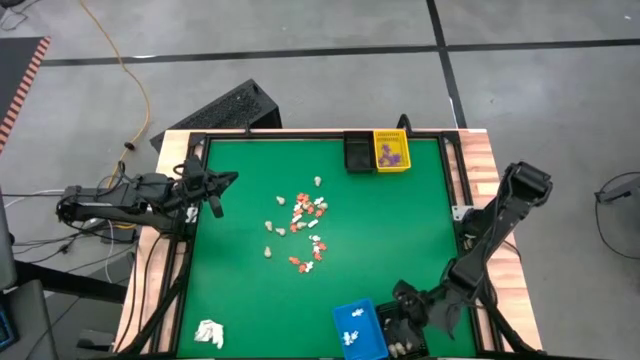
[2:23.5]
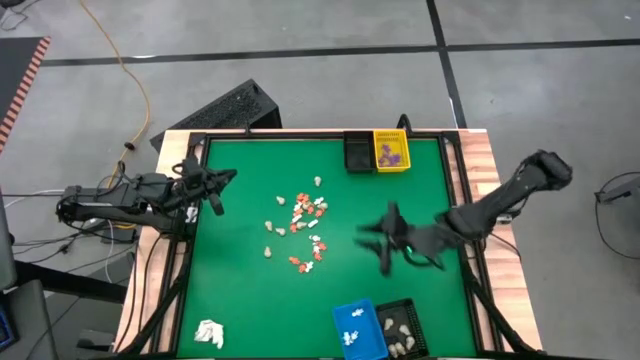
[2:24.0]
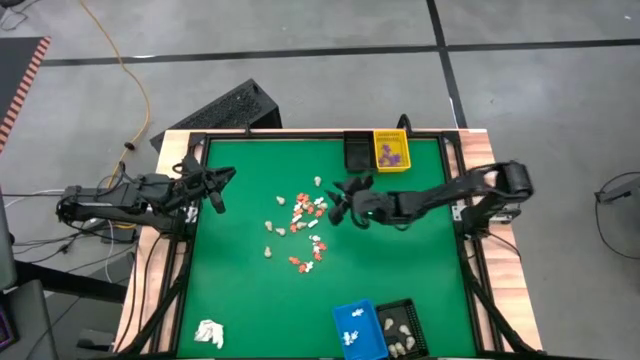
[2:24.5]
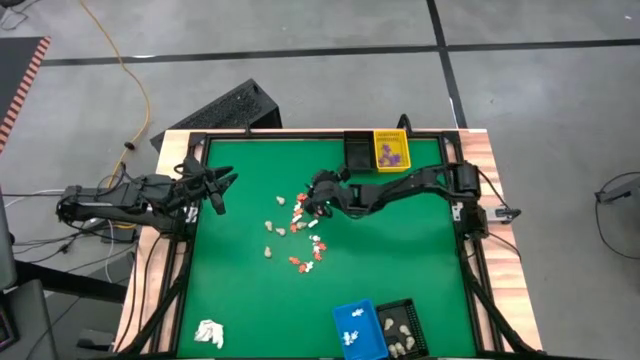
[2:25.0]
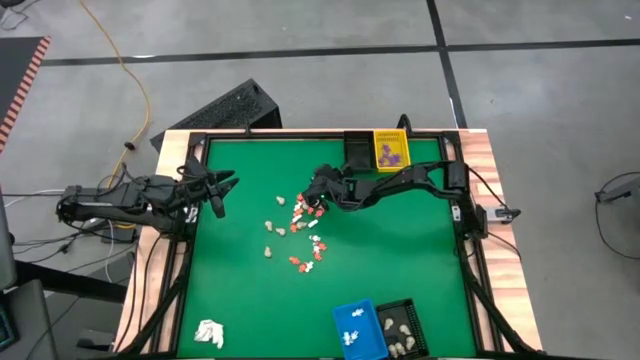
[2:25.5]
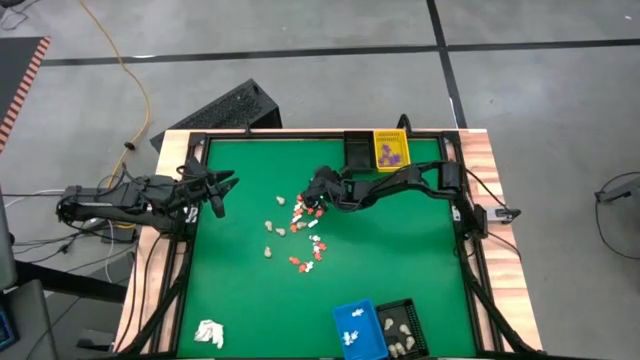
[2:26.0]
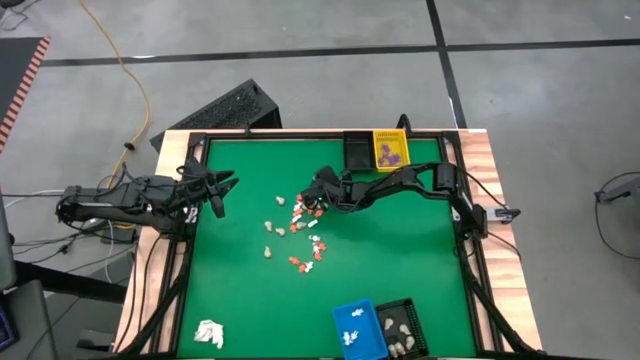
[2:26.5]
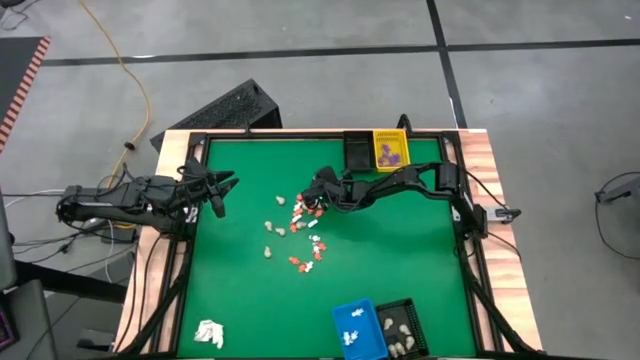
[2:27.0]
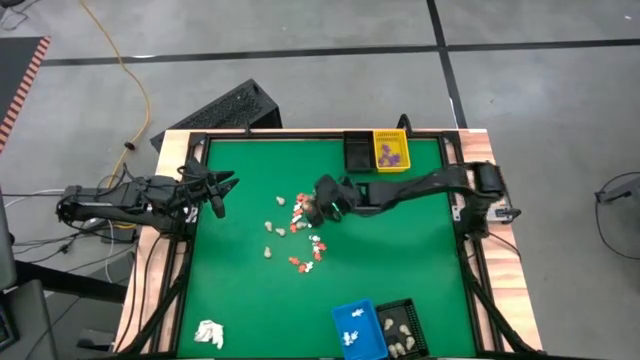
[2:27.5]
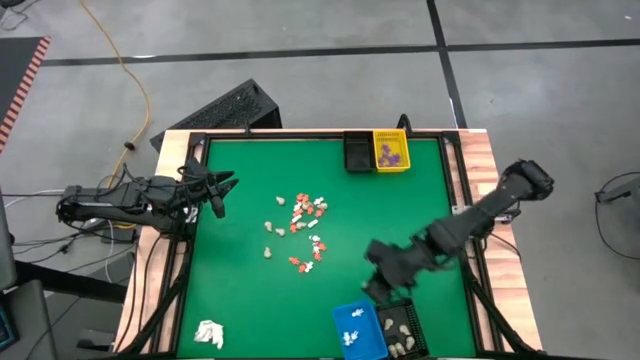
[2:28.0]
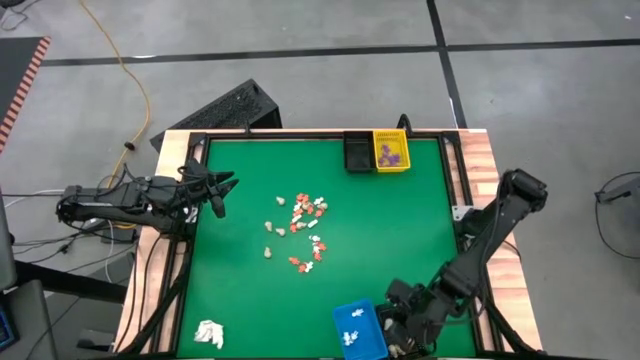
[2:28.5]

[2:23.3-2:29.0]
Task: Sort Halloween decoration
Put the white skull toy into the bottom black basket

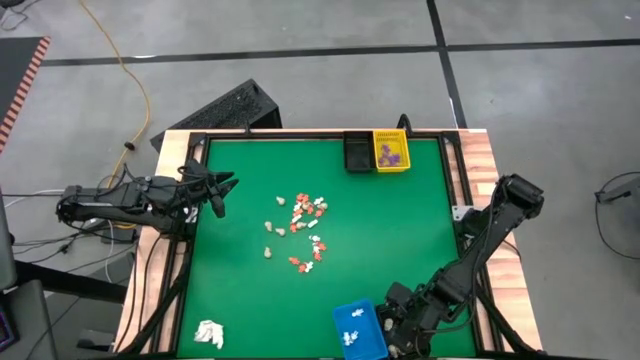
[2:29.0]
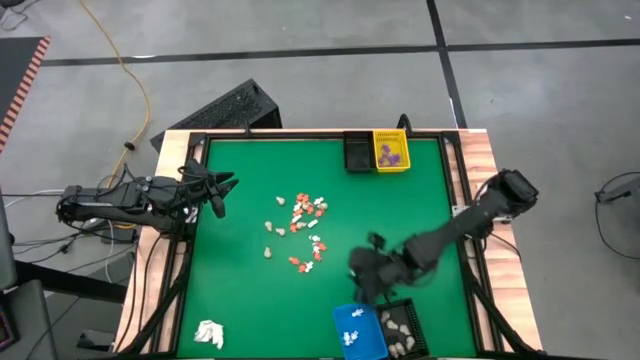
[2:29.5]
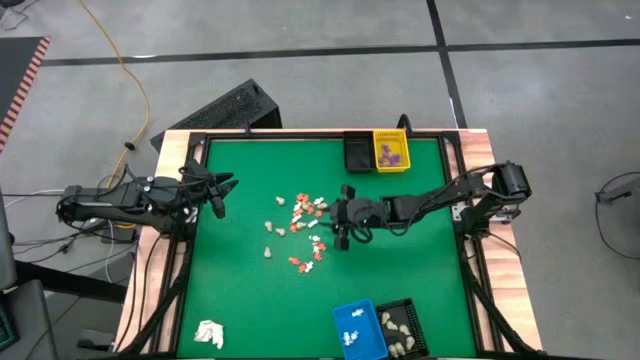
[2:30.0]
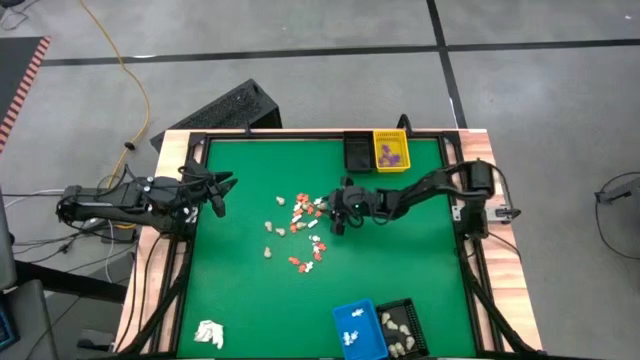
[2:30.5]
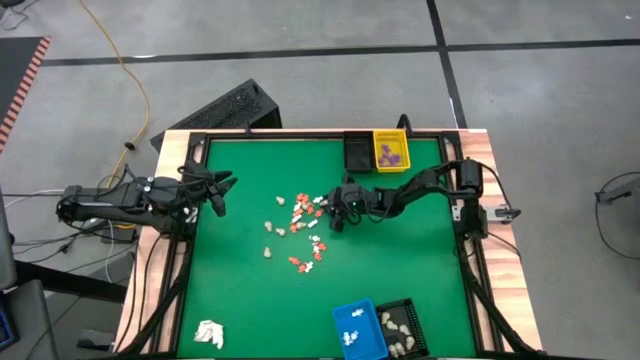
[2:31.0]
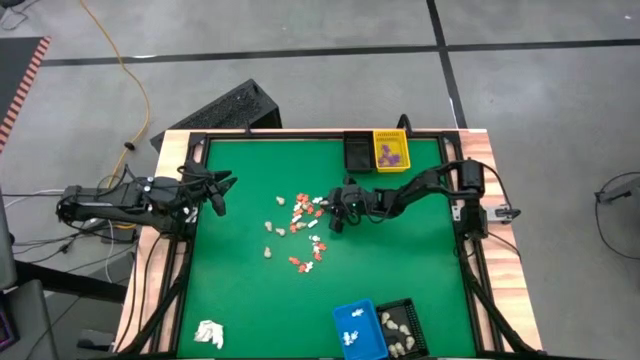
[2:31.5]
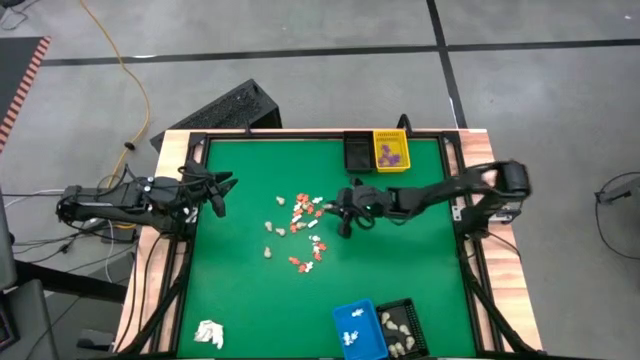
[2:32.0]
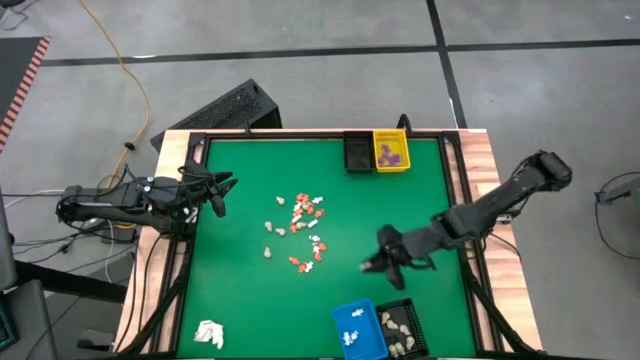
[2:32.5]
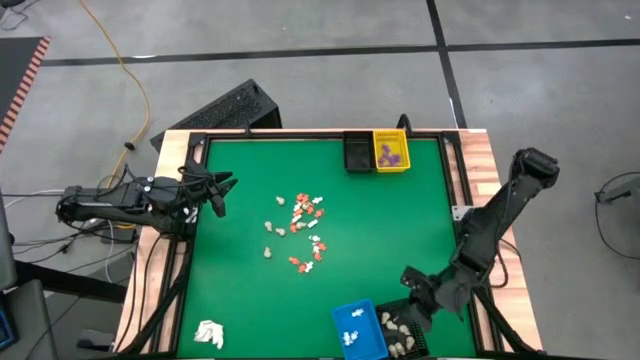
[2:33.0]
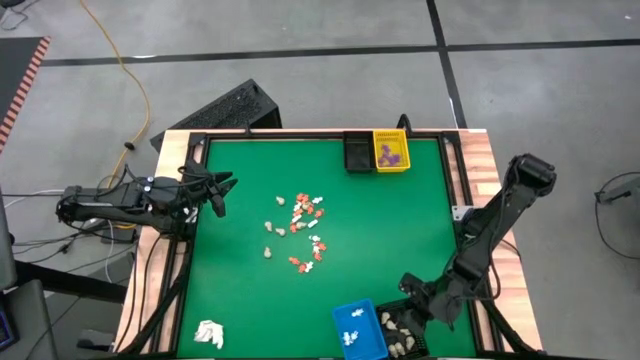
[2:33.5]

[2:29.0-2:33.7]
Put the white skull toy into the bottom black basket

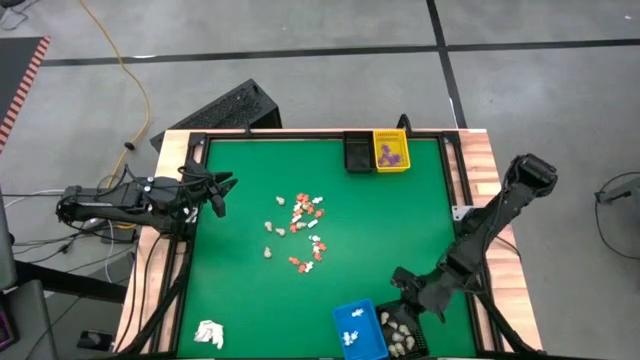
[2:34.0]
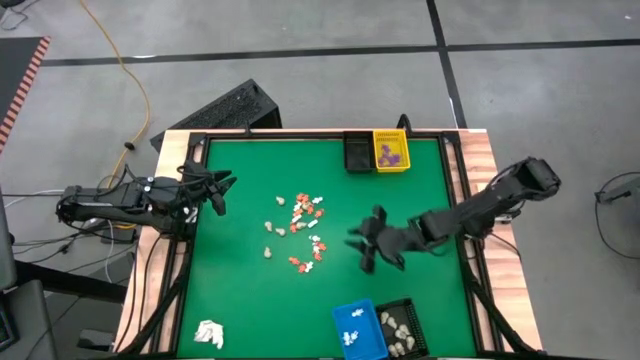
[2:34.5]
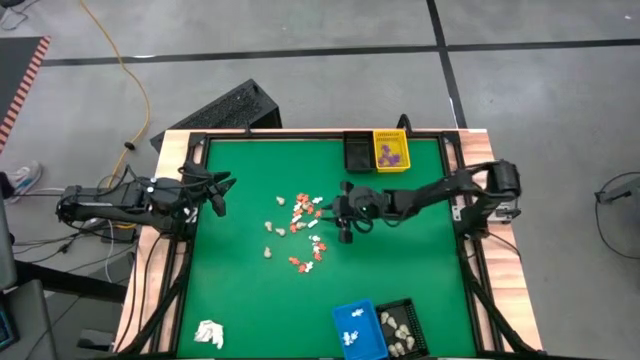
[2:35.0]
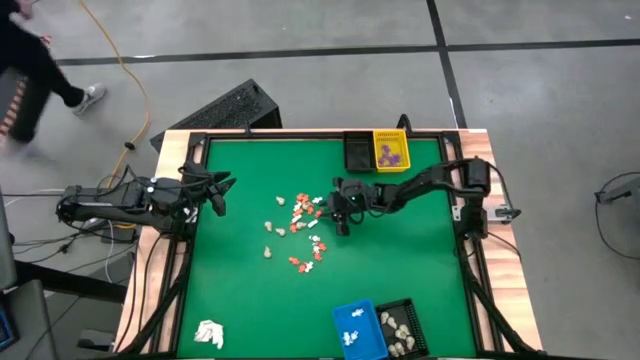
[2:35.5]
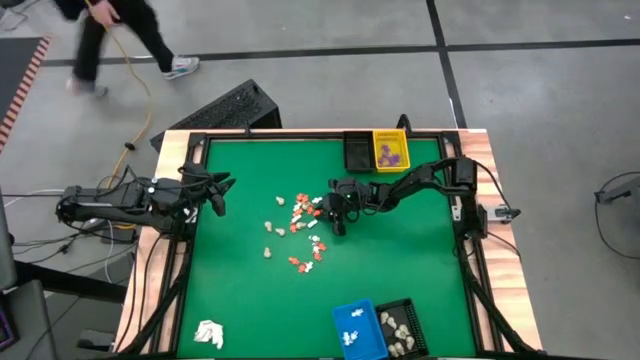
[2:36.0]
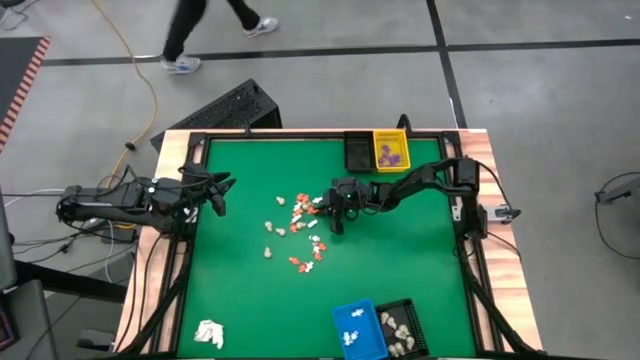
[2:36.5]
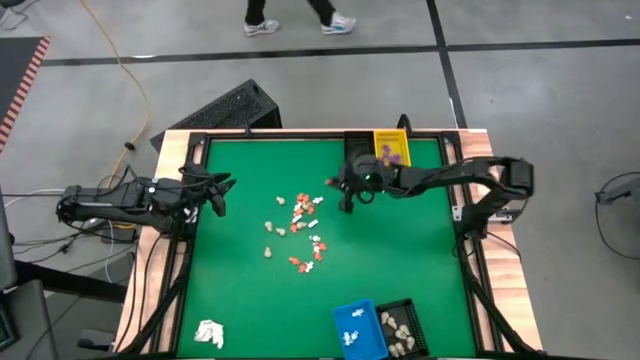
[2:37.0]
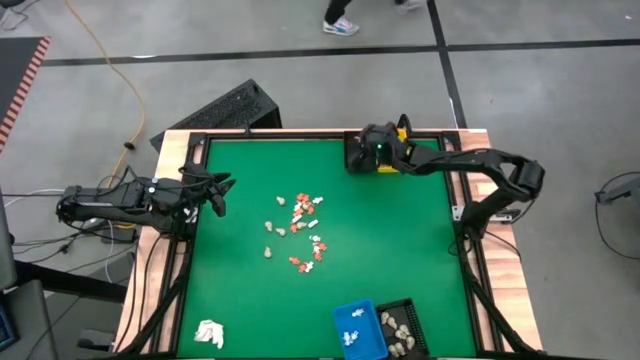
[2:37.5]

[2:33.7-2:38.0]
Put the orange skeleton toy into the top black basket

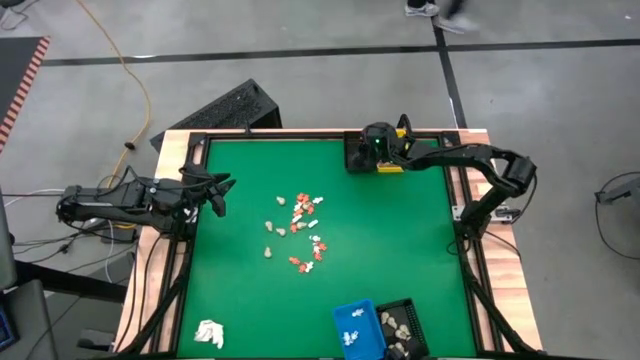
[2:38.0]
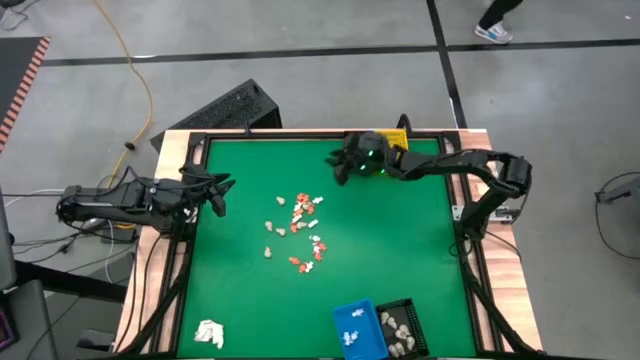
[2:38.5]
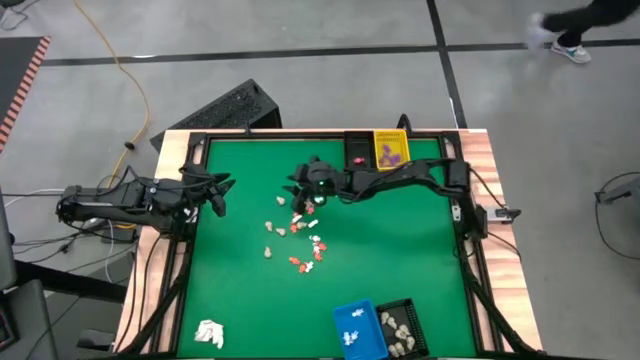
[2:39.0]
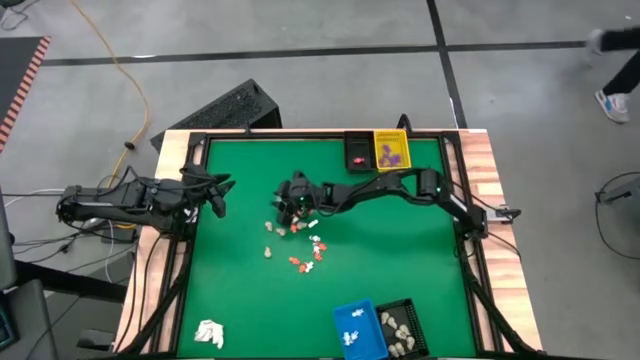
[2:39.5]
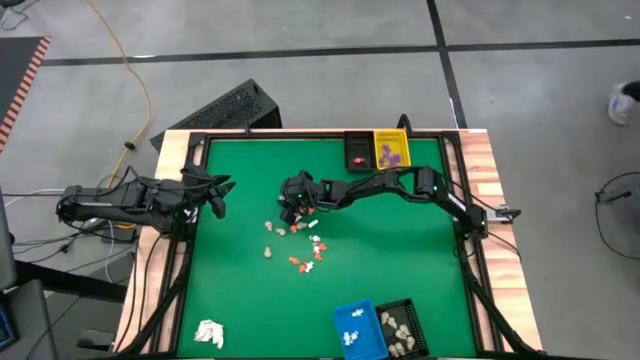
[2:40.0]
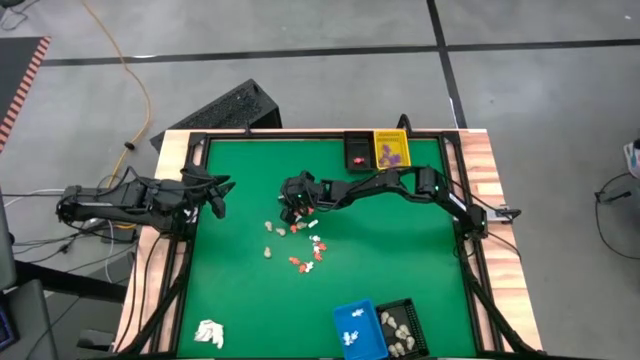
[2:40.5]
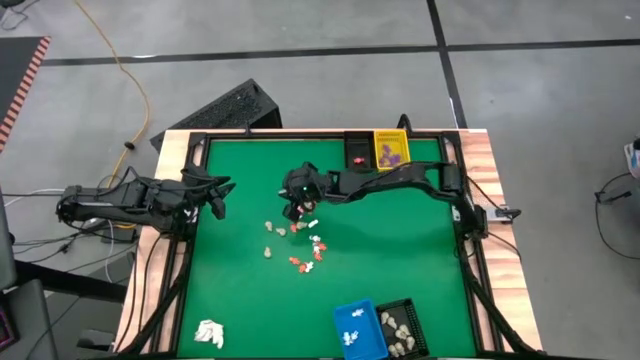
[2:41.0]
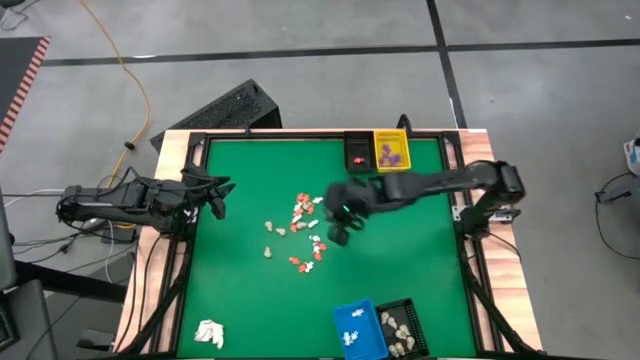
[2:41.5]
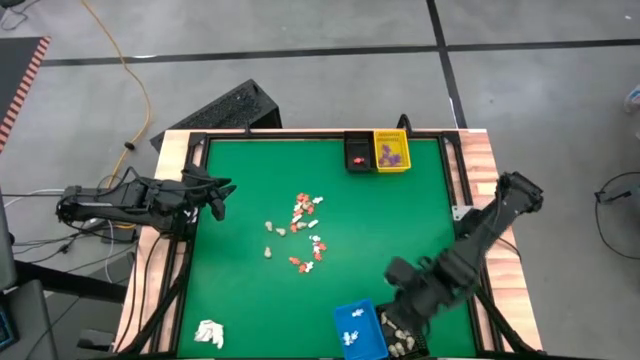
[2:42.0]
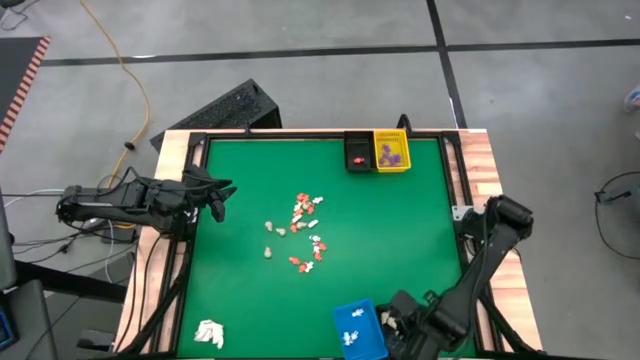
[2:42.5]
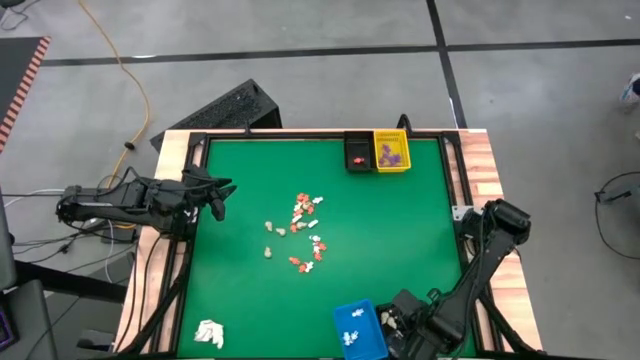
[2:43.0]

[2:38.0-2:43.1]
Put the white skull toy into the bottom black basket

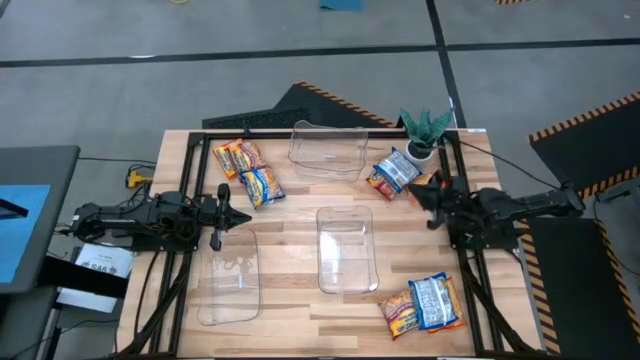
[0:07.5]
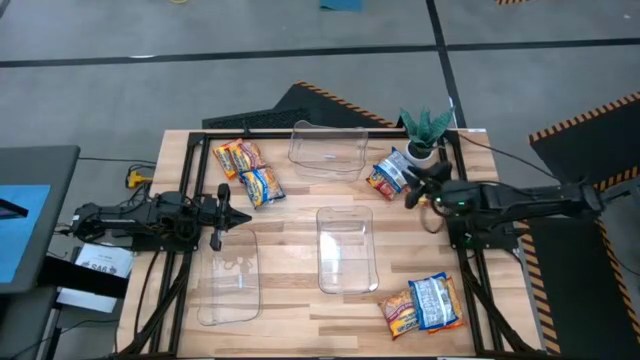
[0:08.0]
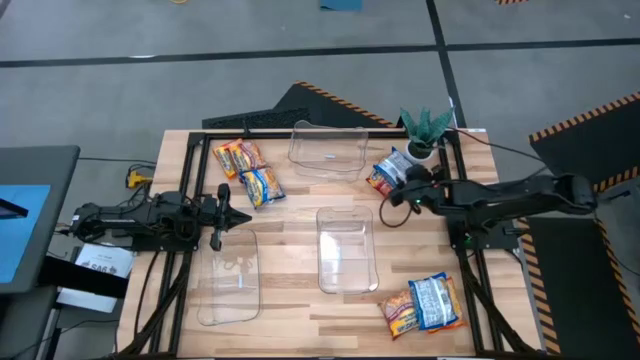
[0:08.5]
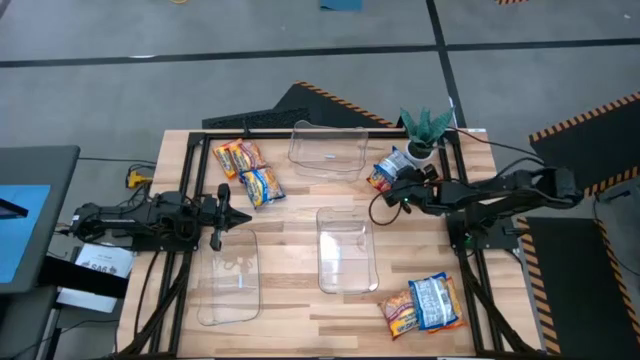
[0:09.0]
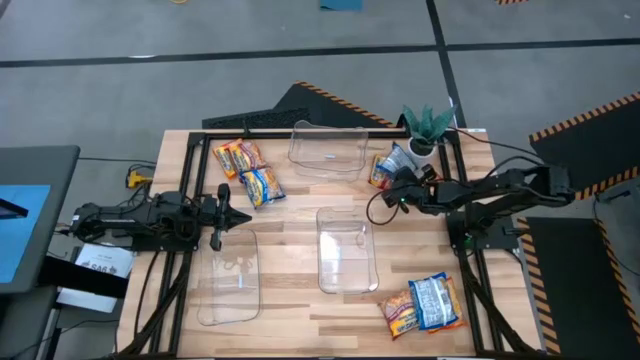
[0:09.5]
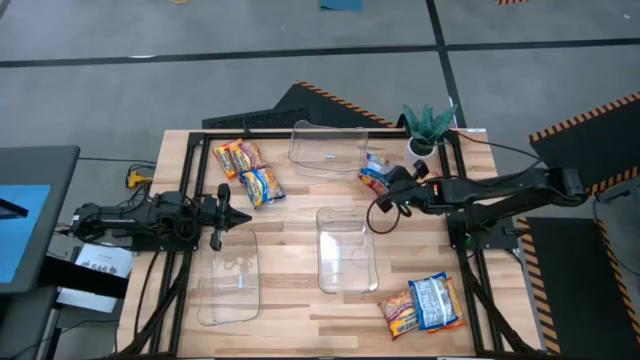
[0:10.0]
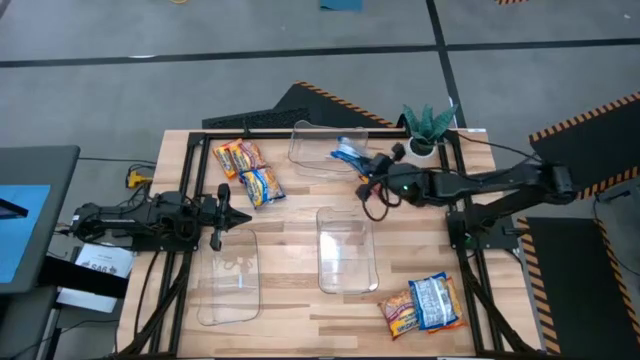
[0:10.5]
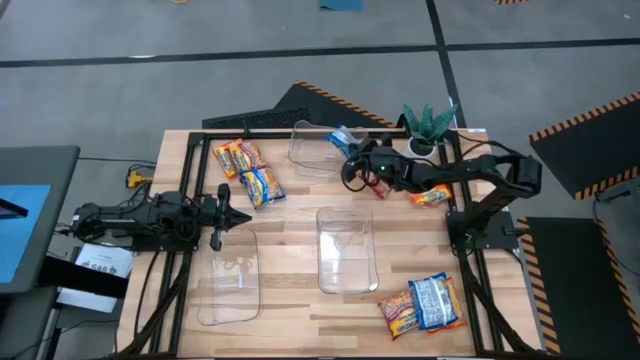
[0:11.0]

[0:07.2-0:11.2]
Task: Sort Maruchan noodles
Put the top right blue noodle pack into the top transparent bin
